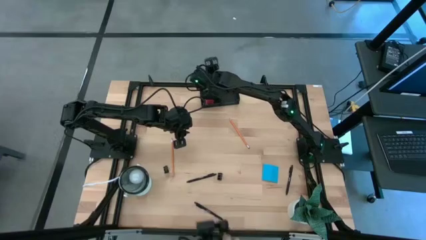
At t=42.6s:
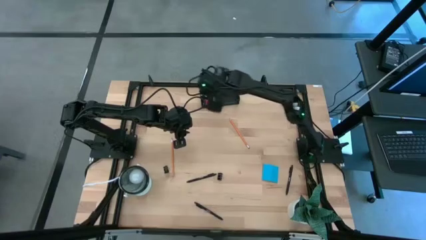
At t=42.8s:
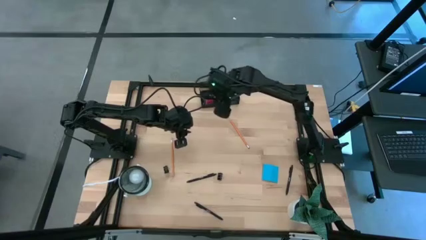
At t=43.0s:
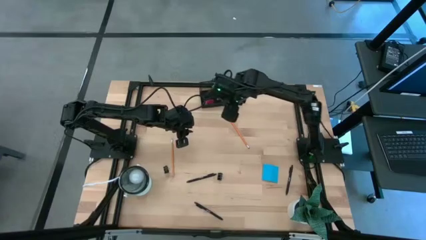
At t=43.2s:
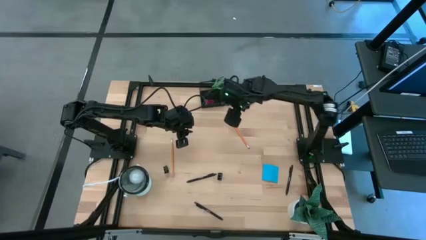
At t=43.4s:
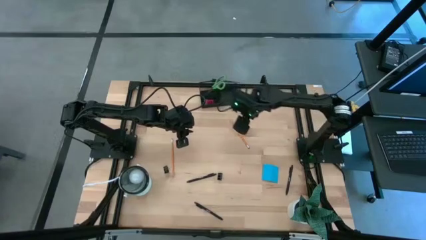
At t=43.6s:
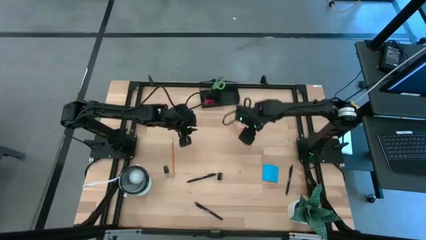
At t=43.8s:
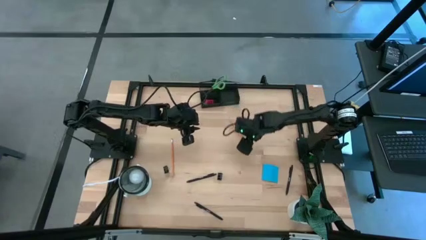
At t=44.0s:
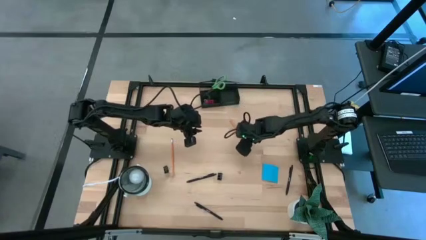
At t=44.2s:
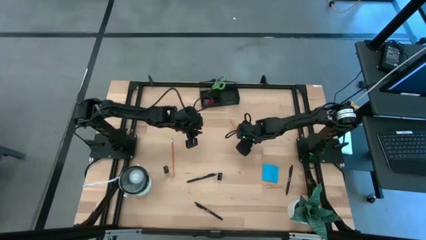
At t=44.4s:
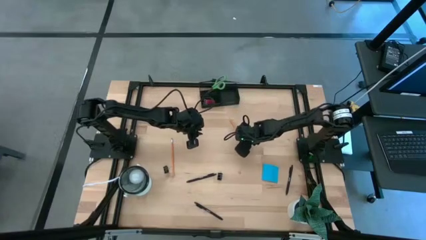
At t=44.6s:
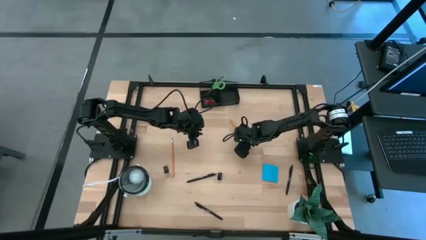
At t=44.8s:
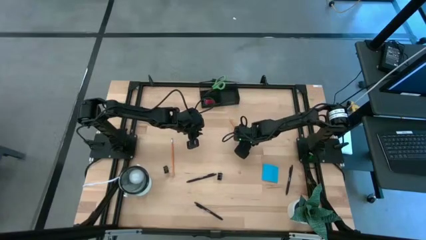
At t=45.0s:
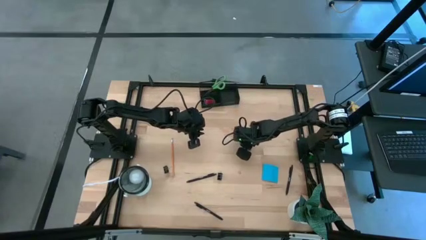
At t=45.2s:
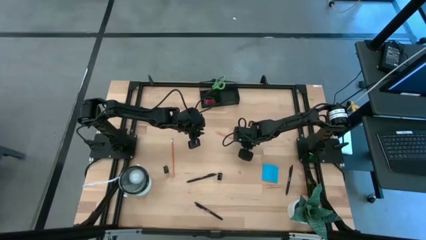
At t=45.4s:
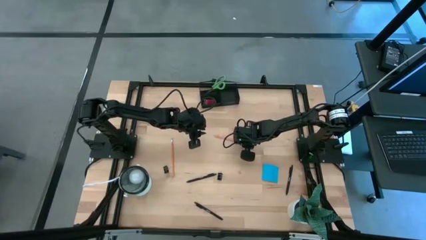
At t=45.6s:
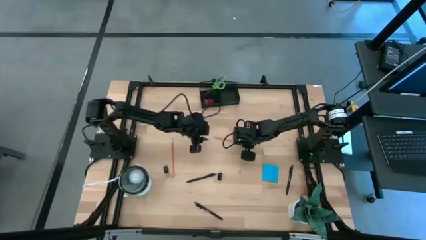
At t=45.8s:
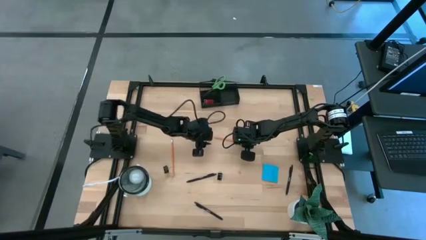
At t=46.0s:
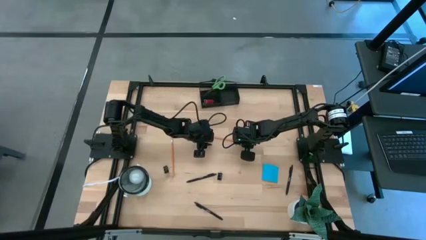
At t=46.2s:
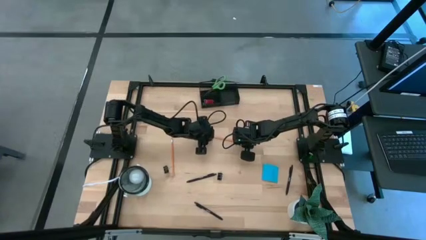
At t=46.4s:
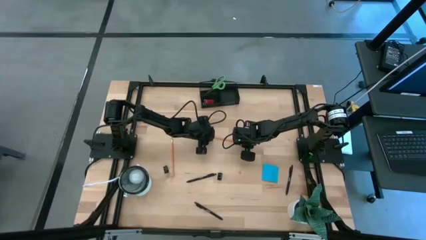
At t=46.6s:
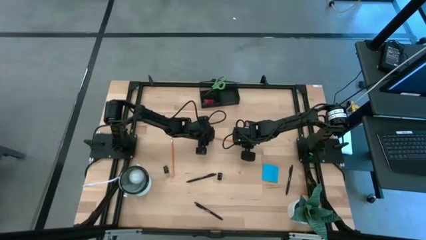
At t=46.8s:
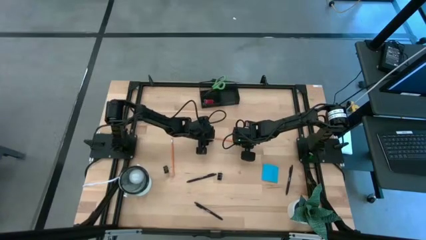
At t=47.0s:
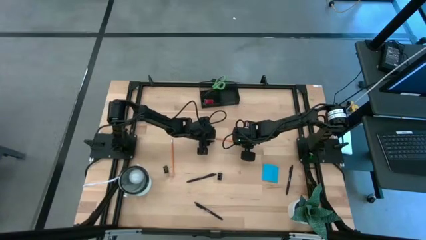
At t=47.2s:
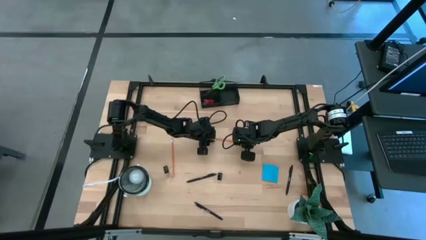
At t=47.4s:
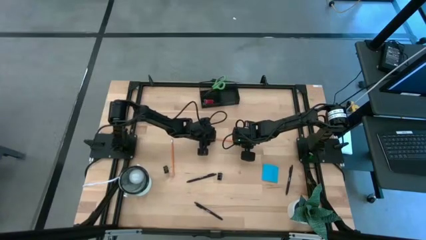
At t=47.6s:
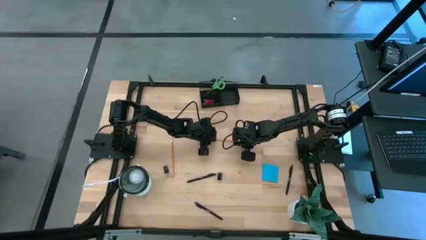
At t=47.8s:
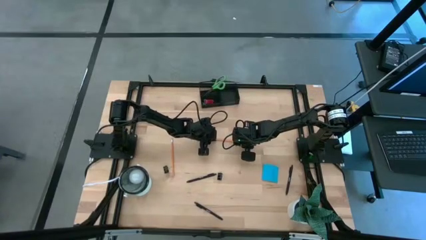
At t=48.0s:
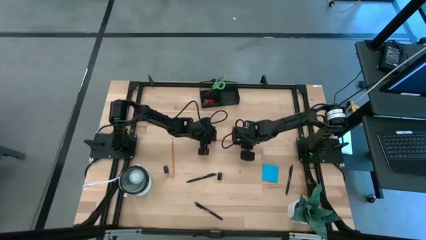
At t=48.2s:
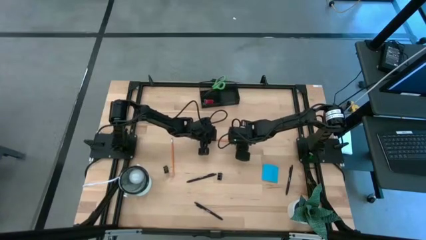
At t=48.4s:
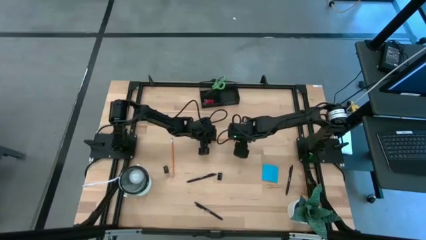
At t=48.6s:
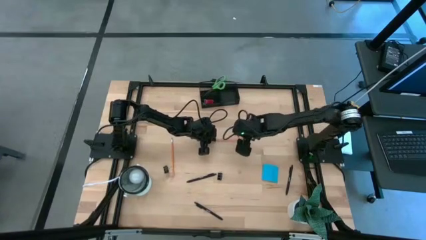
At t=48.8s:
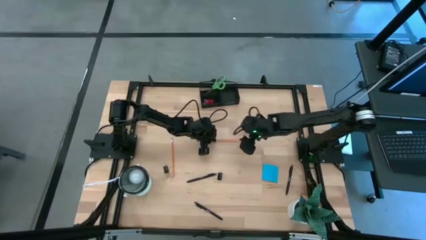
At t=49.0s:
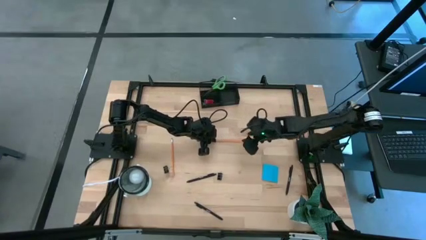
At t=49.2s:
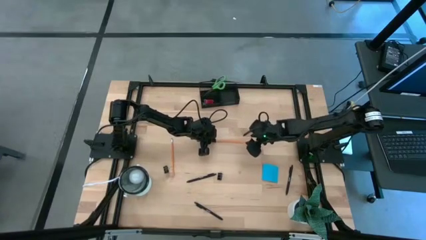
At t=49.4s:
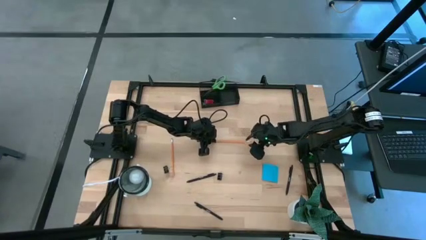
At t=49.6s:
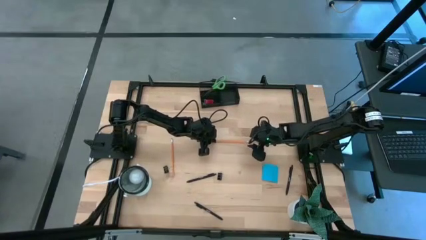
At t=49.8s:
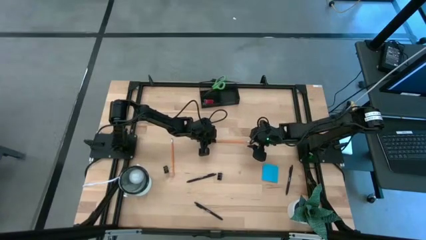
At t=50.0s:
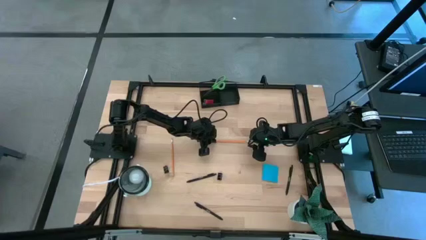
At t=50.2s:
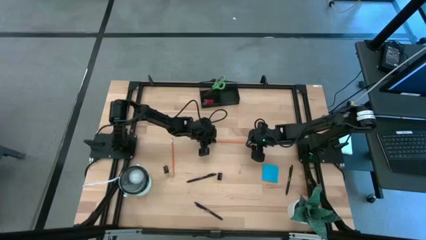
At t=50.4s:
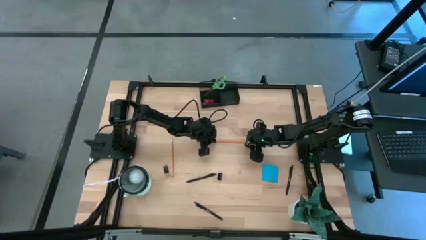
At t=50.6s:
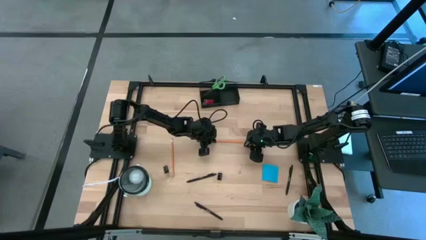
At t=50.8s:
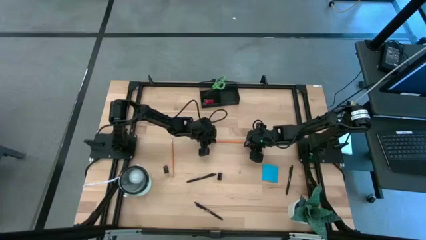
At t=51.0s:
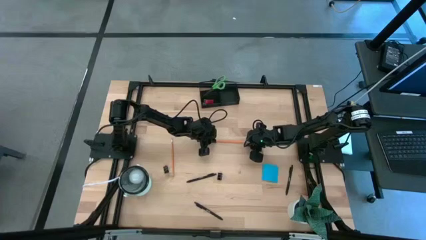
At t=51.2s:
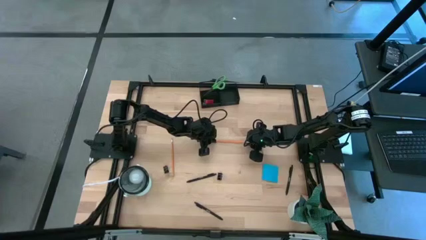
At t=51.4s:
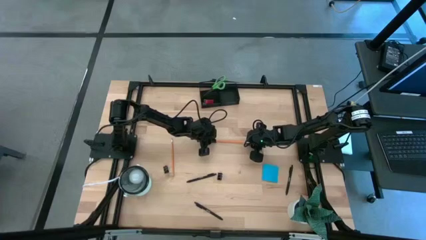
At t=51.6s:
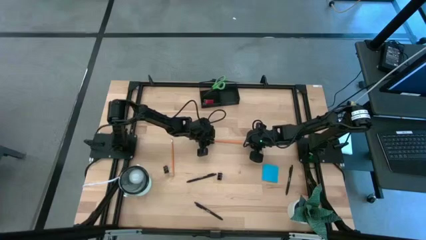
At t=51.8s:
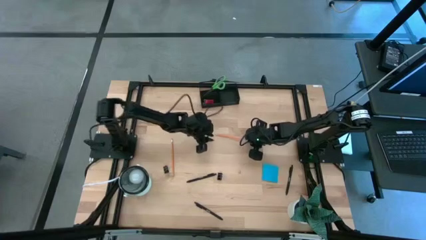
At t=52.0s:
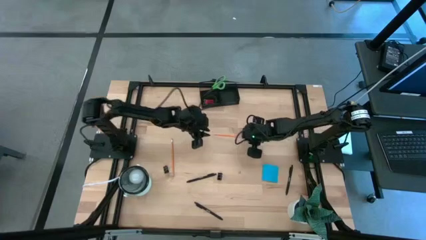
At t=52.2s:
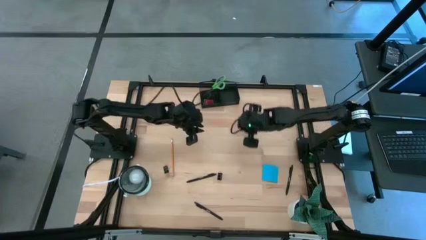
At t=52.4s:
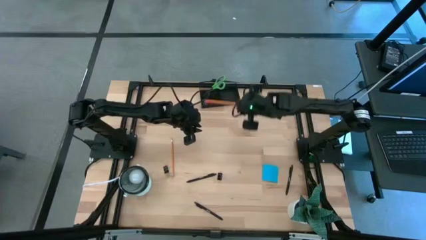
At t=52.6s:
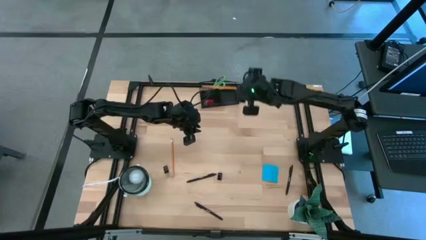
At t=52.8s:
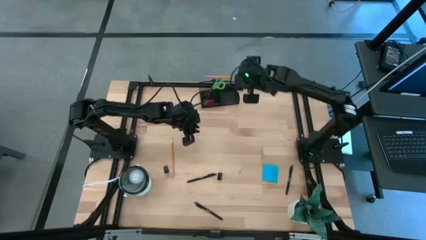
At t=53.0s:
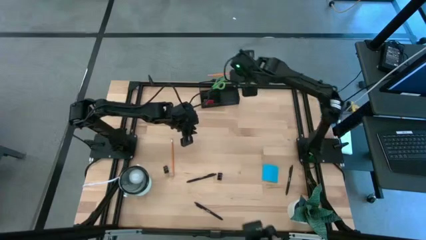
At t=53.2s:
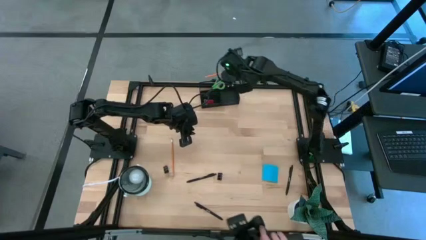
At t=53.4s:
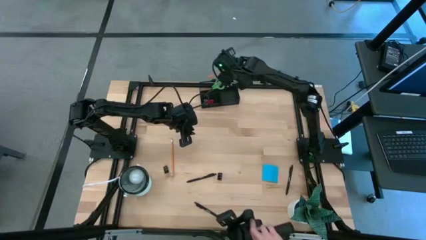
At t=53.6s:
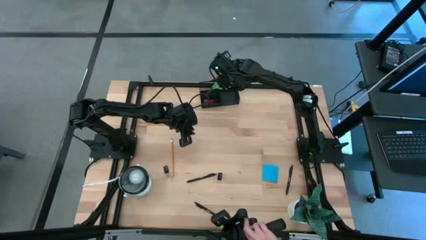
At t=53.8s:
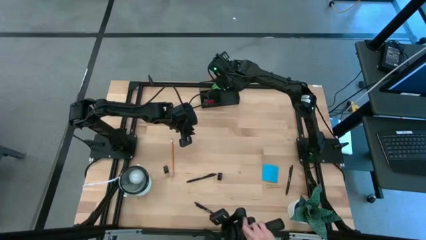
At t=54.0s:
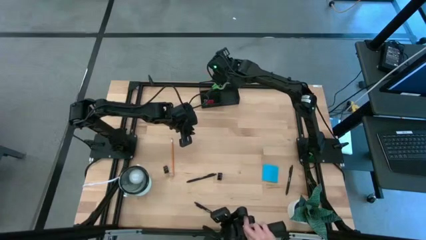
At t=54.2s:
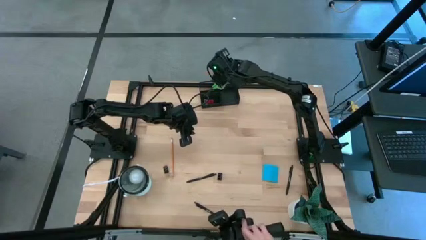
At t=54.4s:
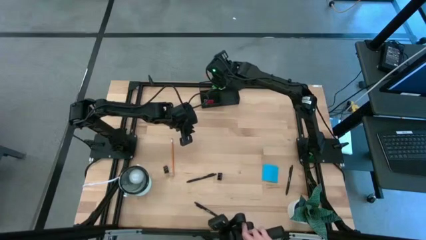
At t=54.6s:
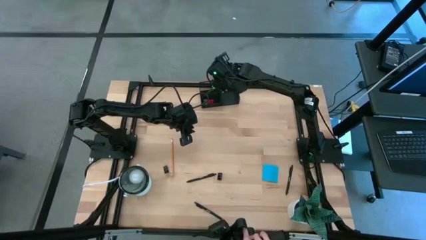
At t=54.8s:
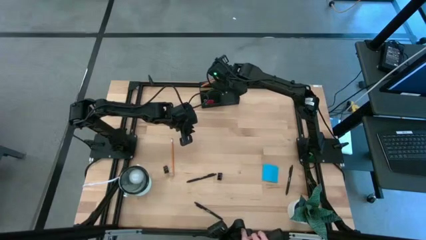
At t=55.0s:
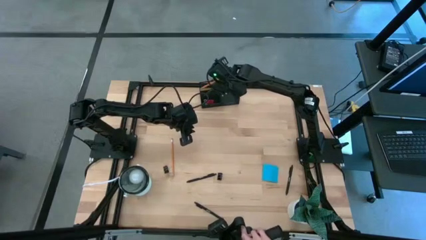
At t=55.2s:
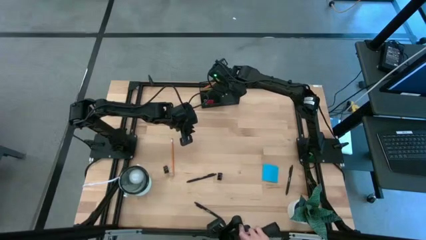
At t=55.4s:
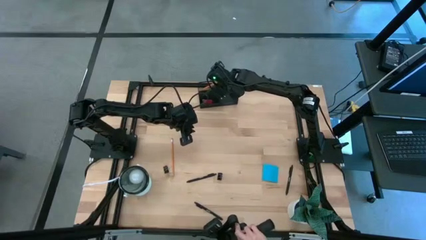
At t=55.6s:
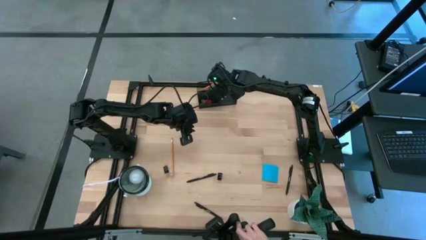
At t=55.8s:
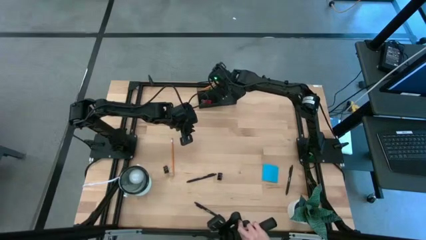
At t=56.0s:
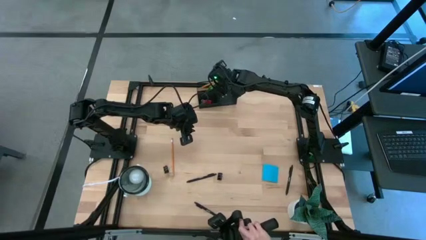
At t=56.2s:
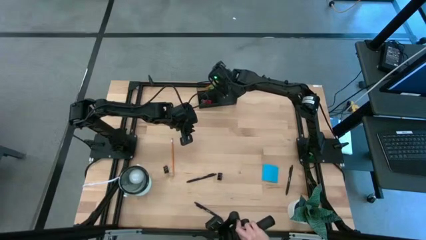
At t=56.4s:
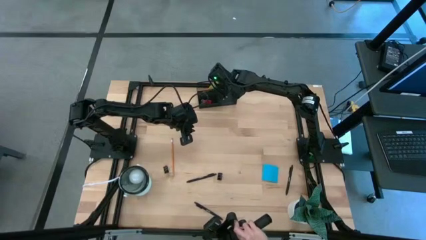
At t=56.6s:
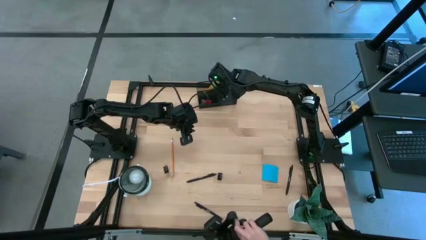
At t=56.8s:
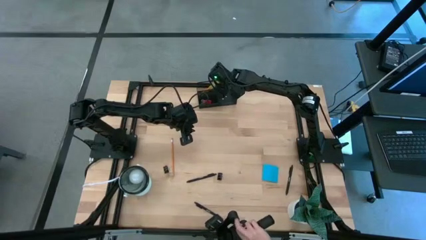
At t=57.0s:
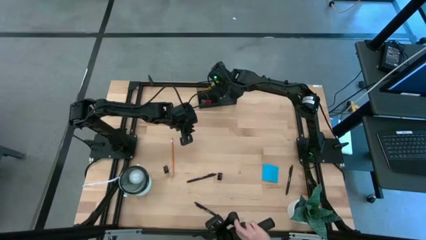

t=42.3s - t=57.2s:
Task: Pick and place office supplies into organizer
Put the right orange pencil into the desk organizer
